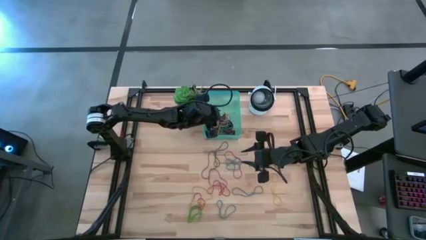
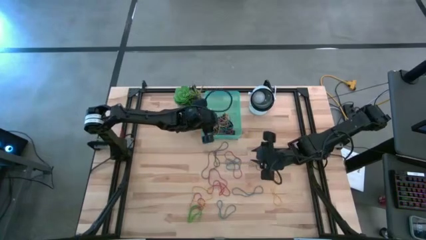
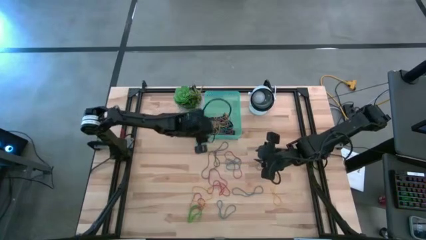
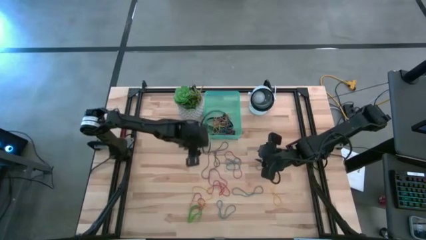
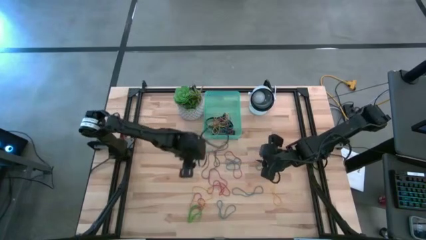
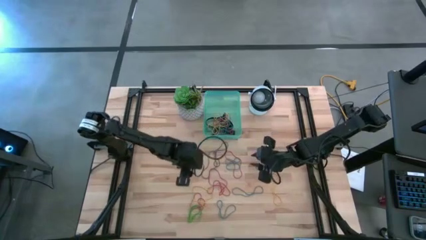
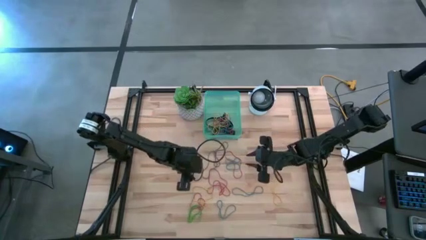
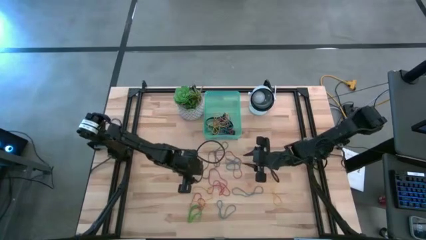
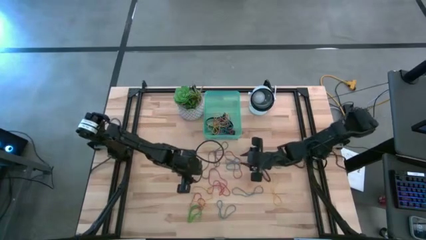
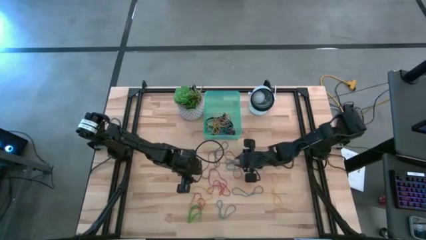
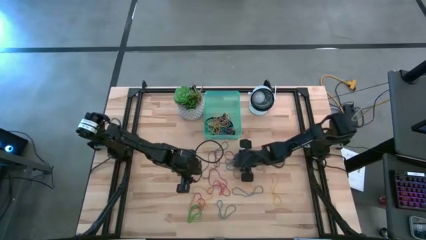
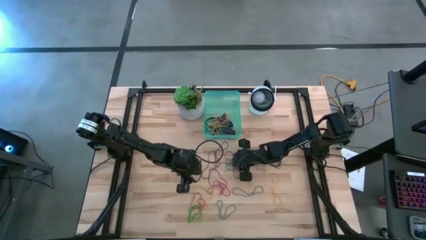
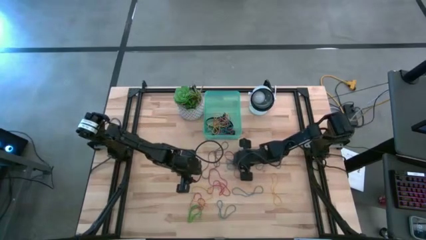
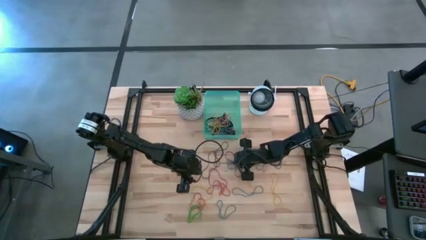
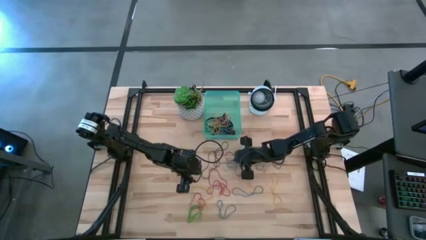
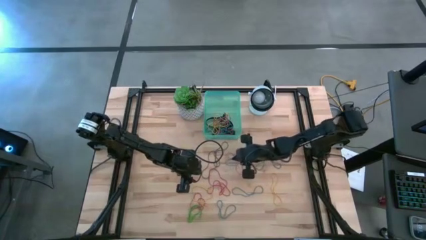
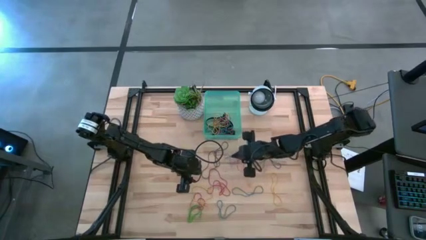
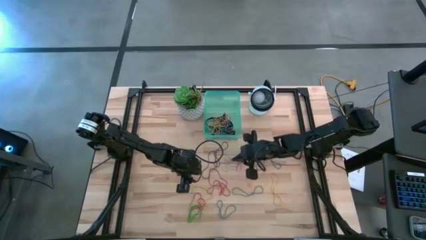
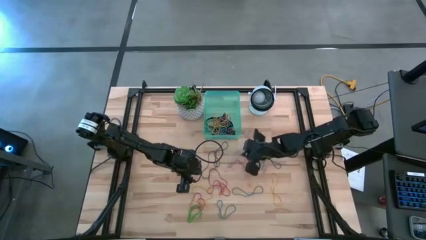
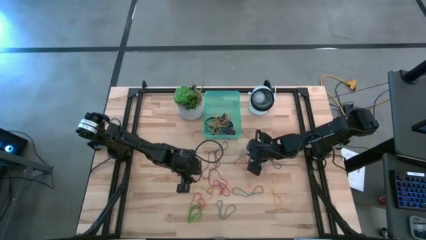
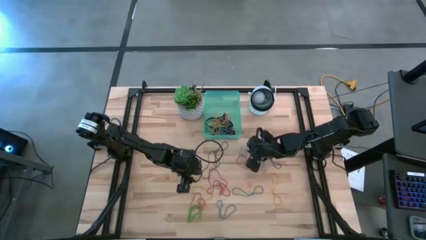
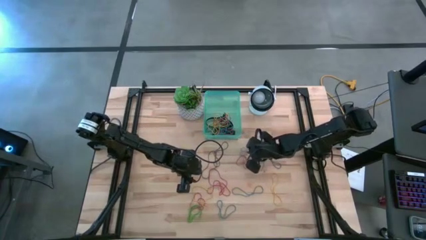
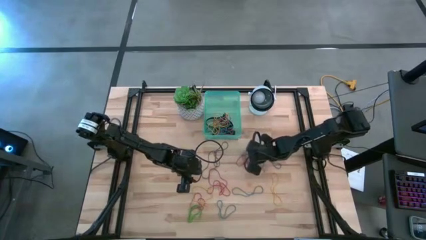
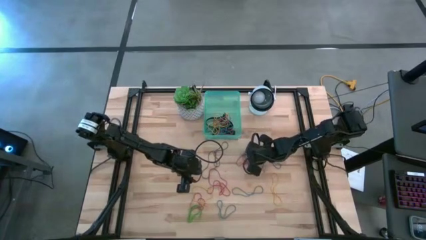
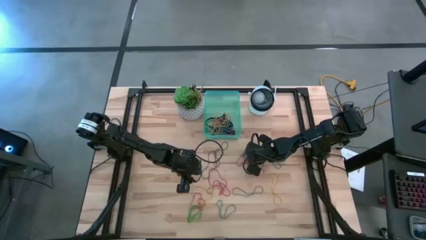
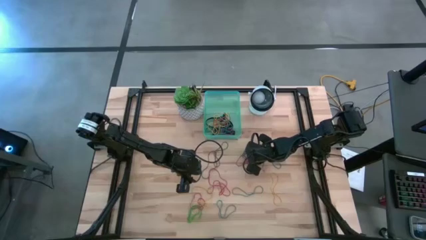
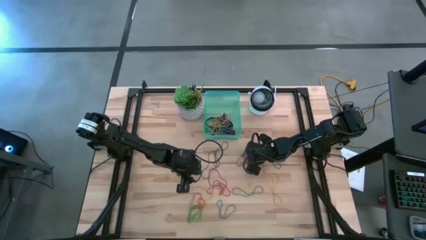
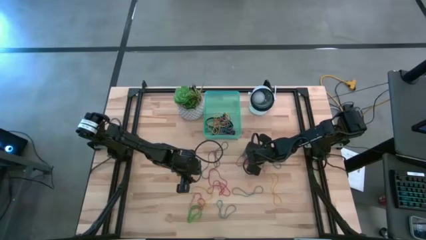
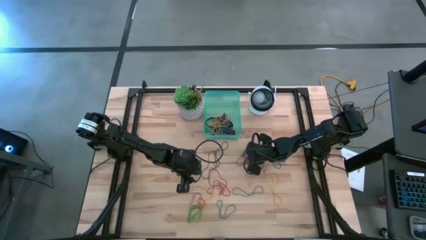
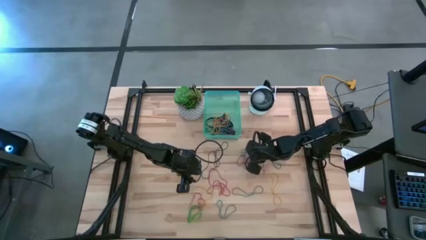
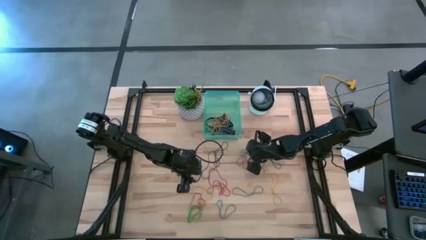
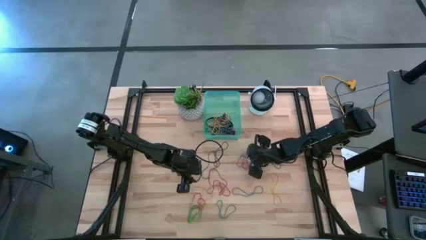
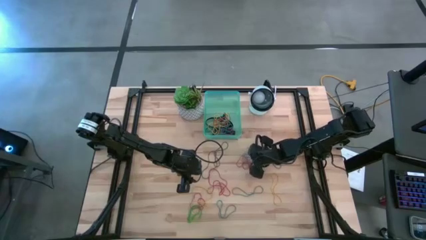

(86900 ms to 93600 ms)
Task: Pick and place rubber bands into bin
Put the blue rubber band into the green bin

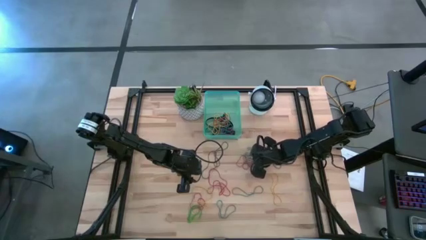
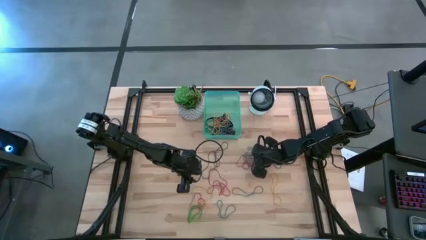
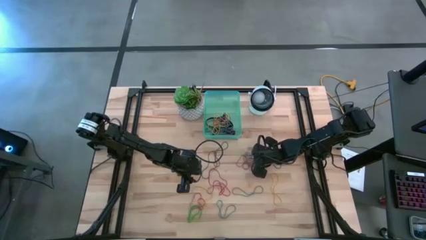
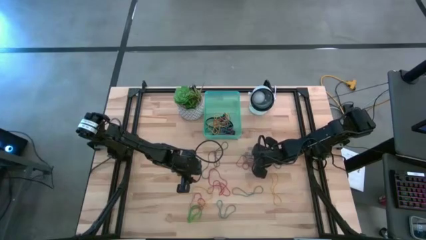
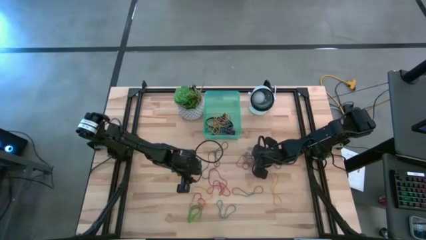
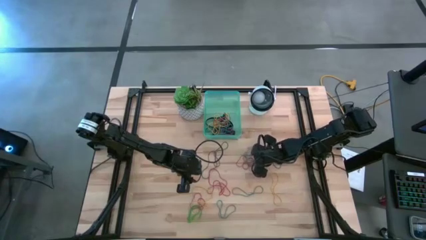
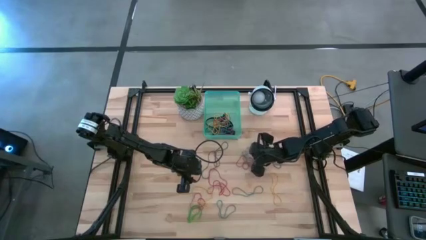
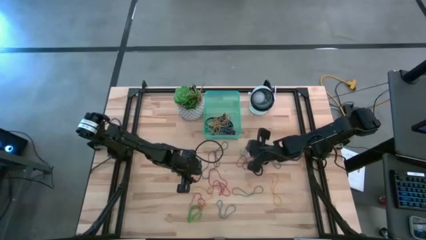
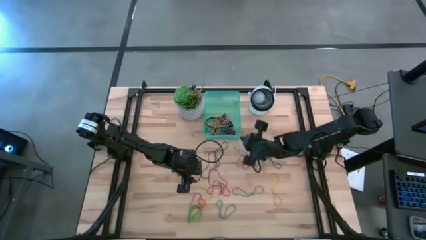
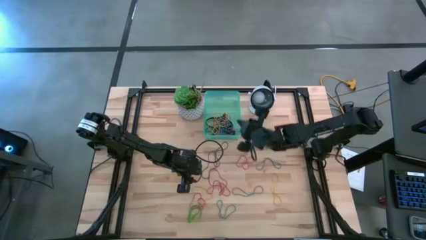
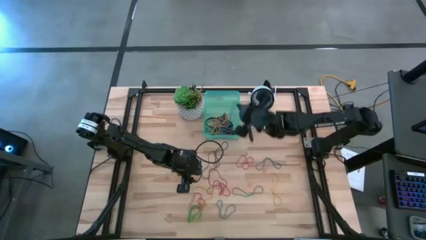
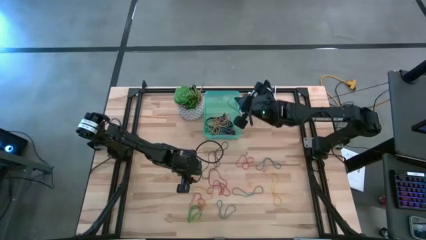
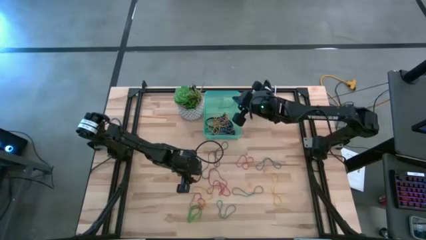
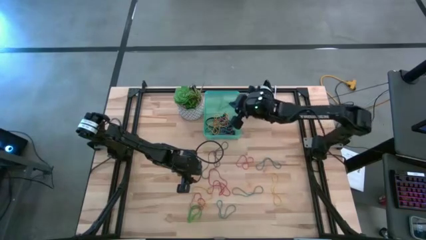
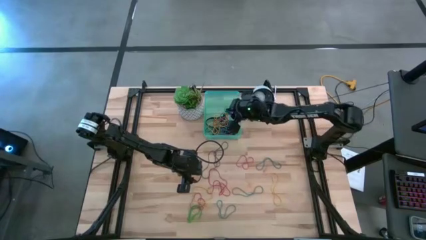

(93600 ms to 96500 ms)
Put the blue rubber band into the green bin

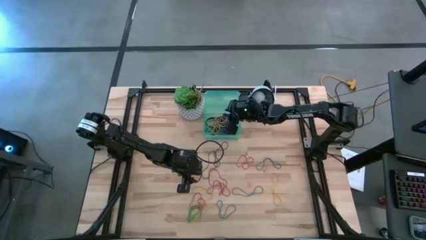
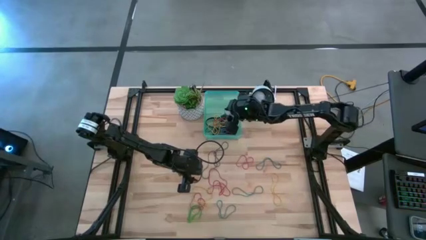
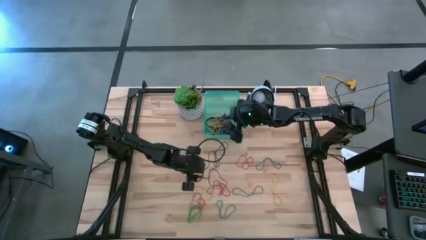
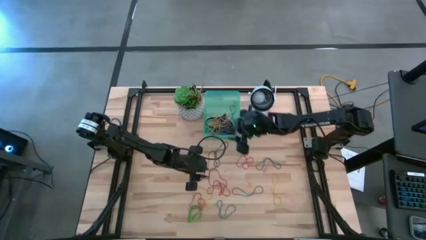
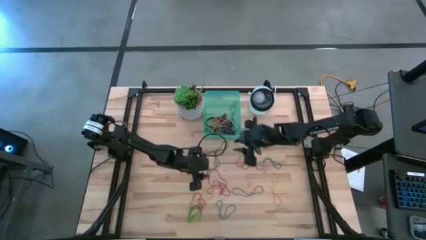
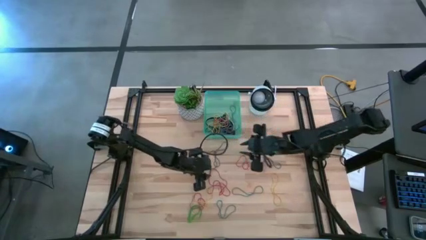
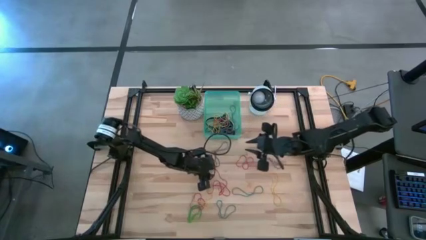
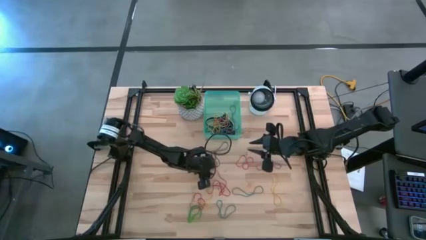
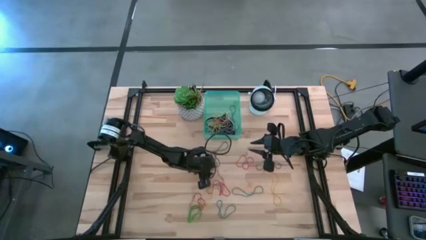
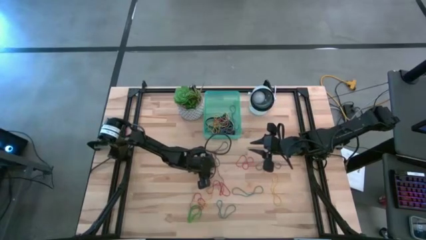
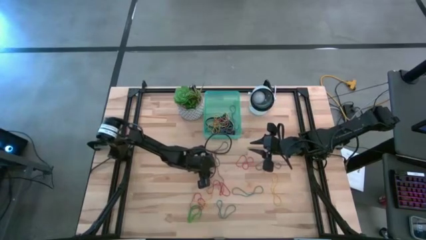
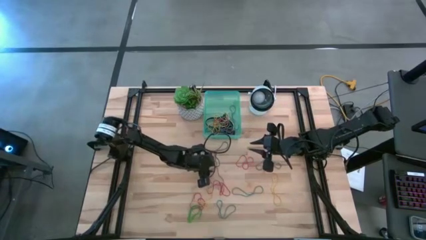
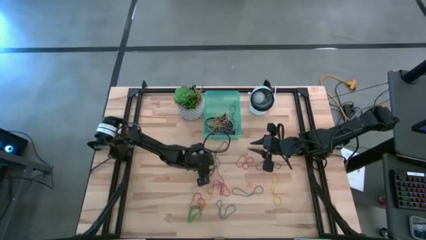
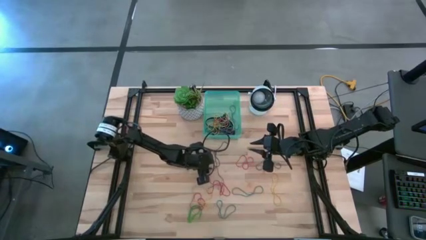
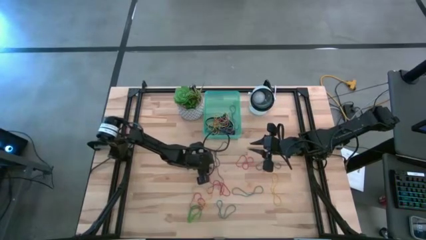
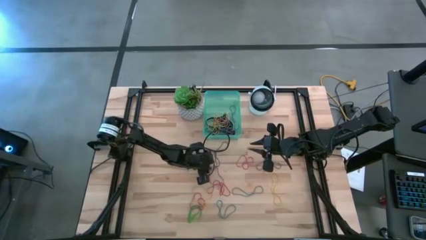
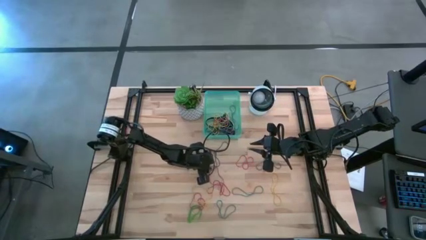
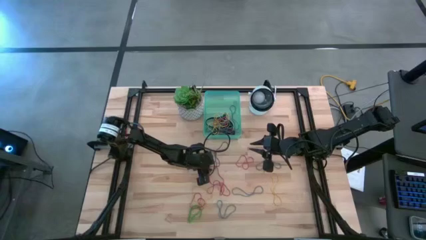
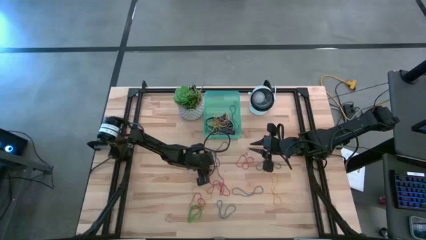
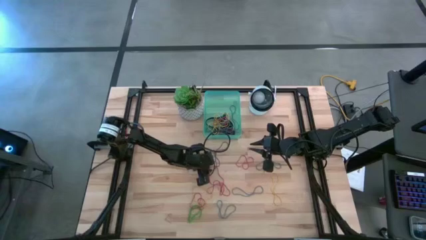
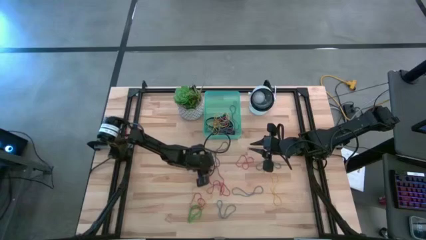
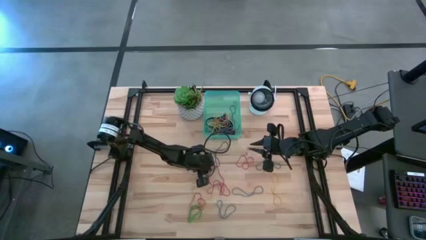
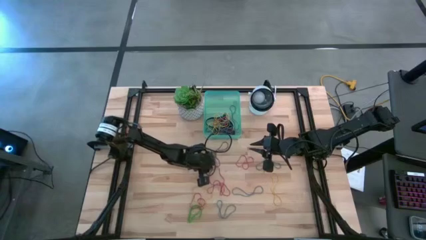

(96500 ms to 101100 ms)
Put the red rubber band into the green bin

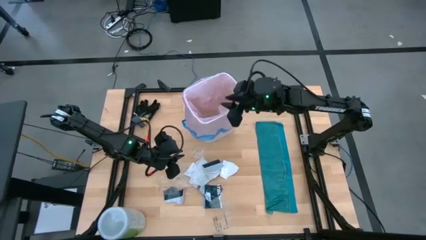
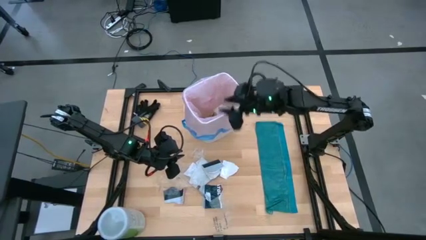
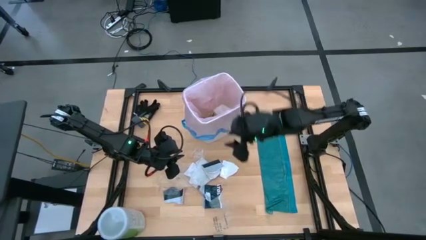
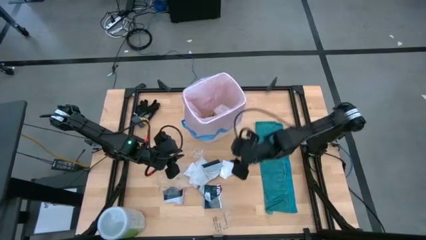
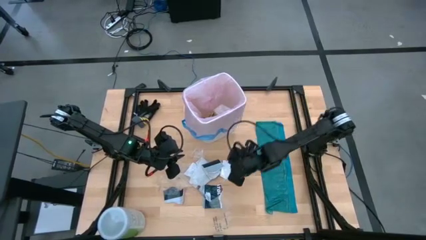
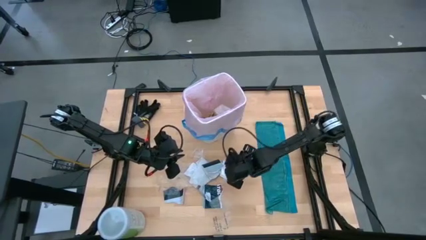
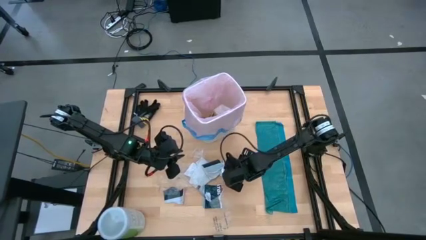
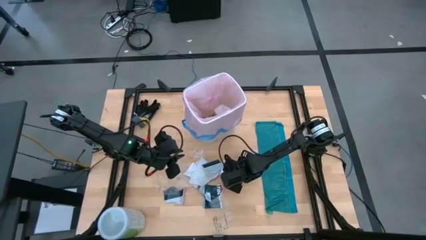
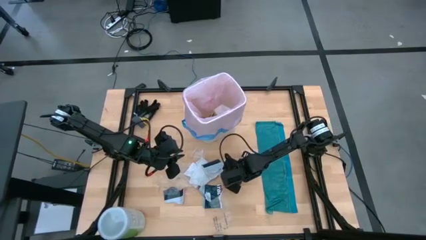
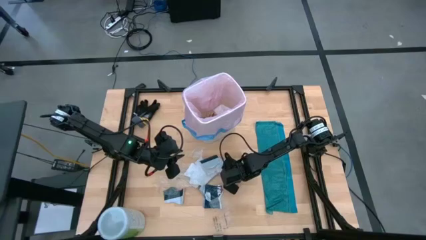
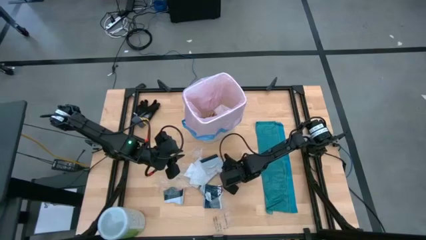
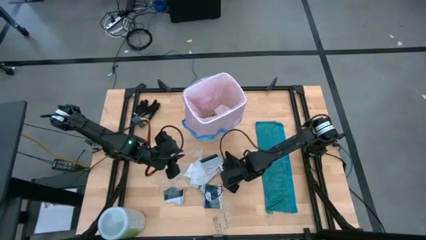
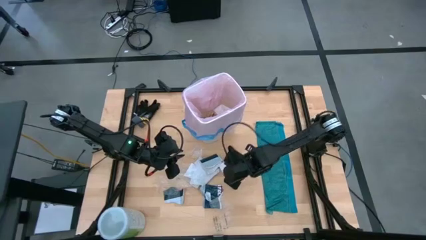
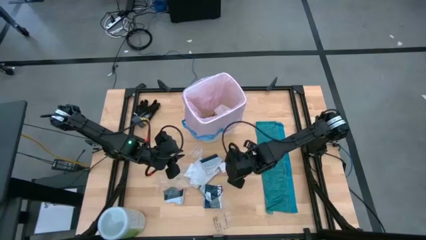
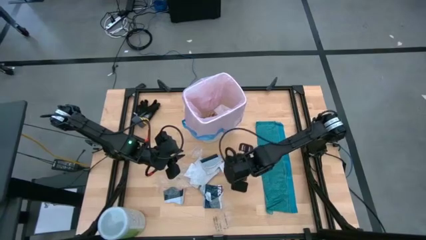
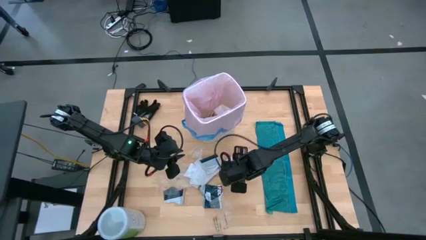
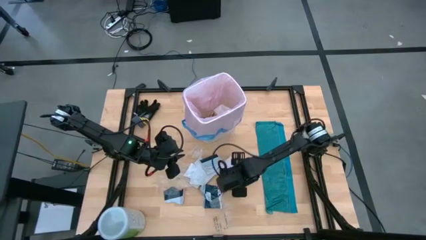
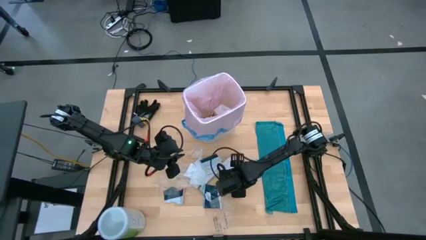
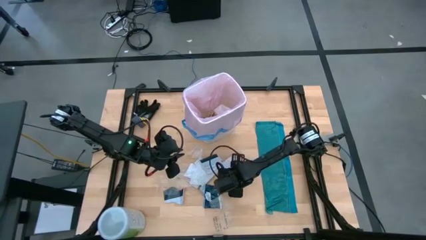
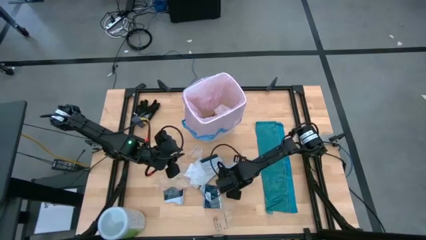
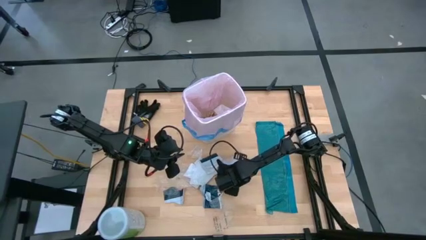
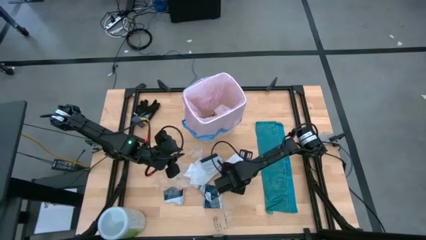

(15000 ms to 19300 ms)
Task: place trash/remove bag and relplace
Put the white paper into the white trash bin
